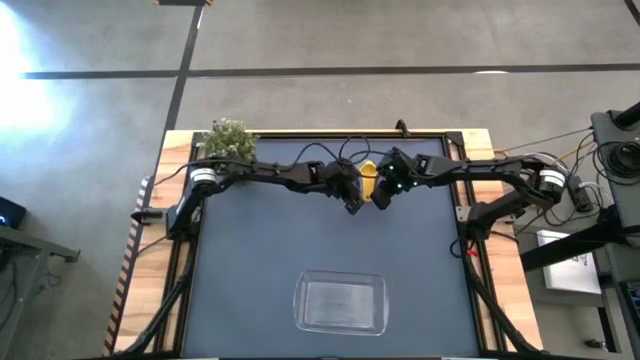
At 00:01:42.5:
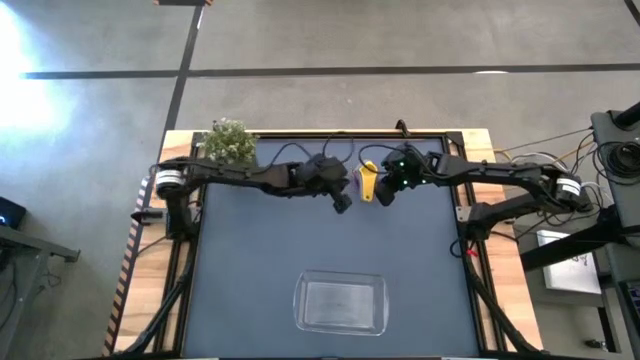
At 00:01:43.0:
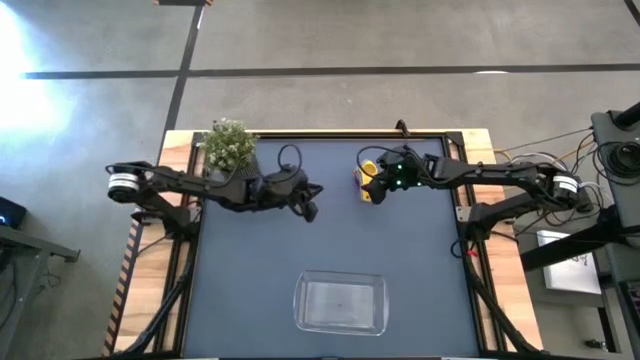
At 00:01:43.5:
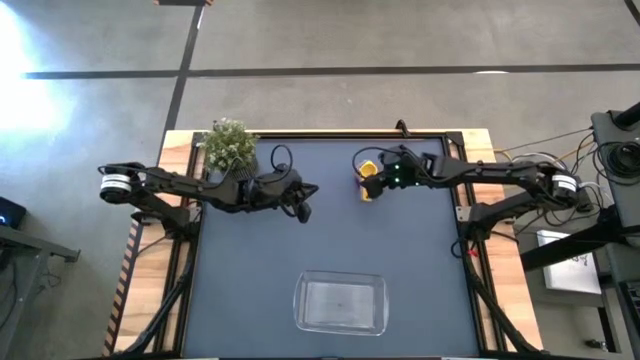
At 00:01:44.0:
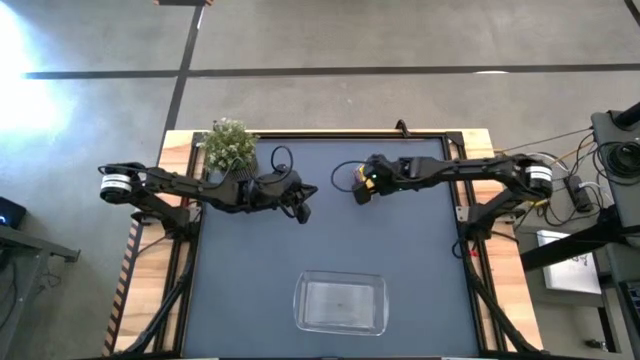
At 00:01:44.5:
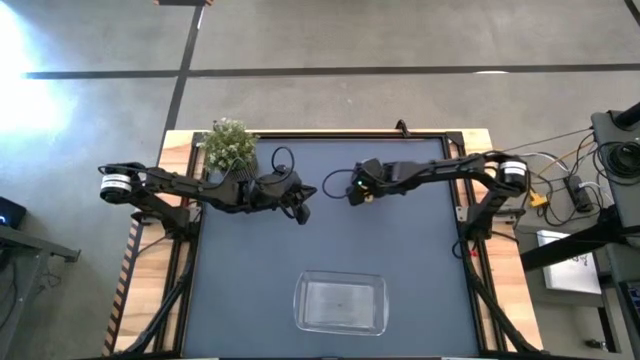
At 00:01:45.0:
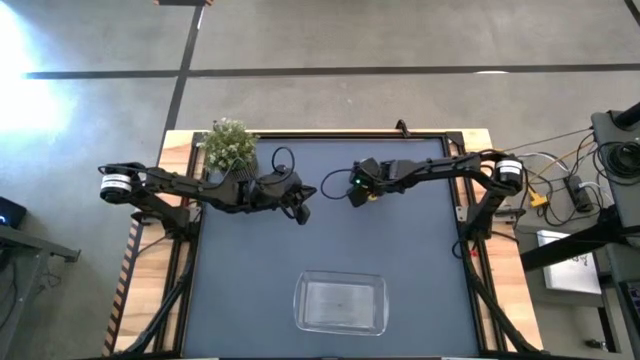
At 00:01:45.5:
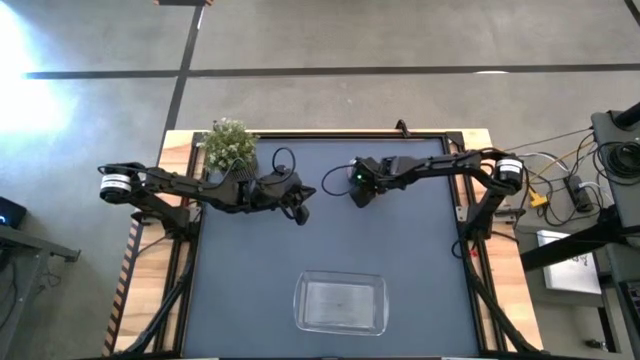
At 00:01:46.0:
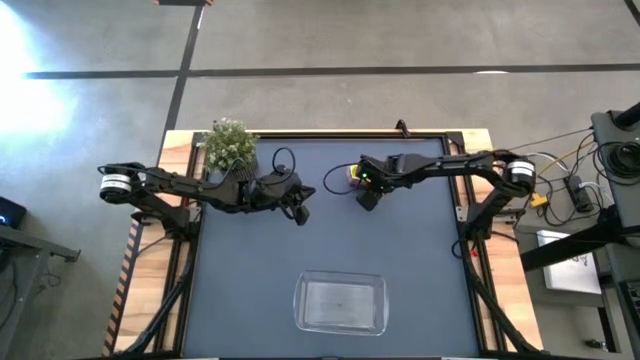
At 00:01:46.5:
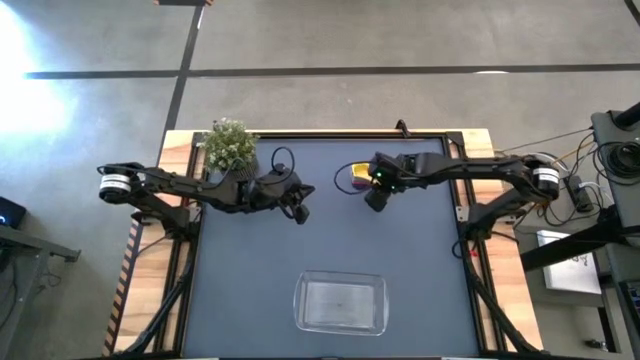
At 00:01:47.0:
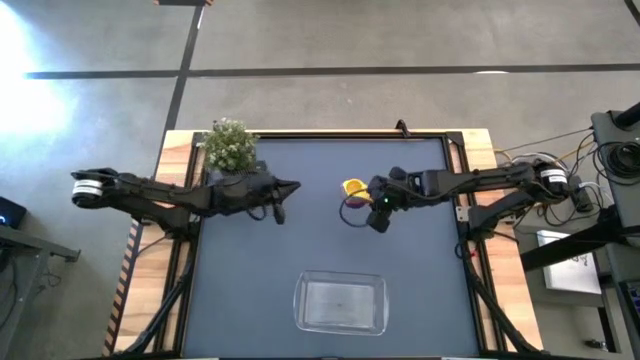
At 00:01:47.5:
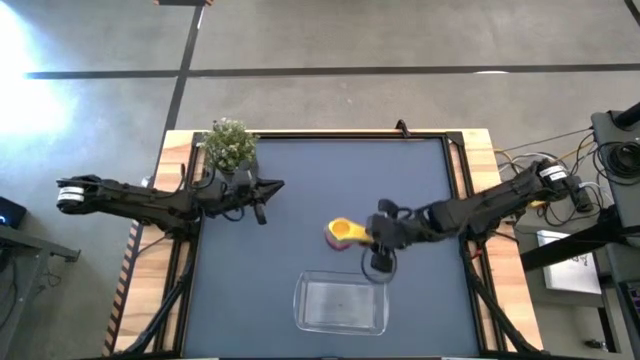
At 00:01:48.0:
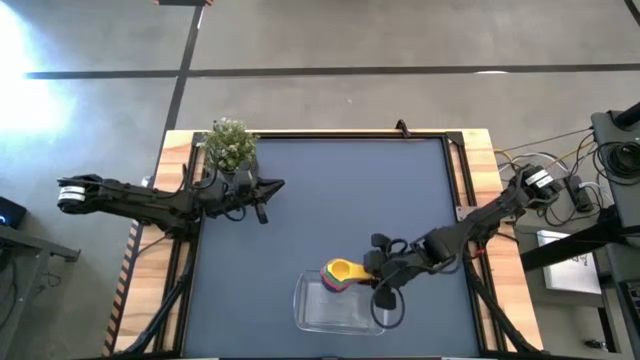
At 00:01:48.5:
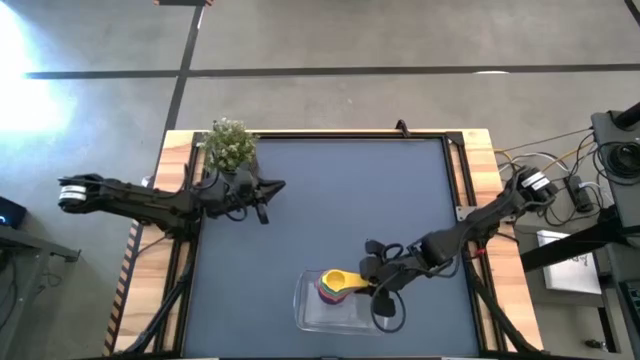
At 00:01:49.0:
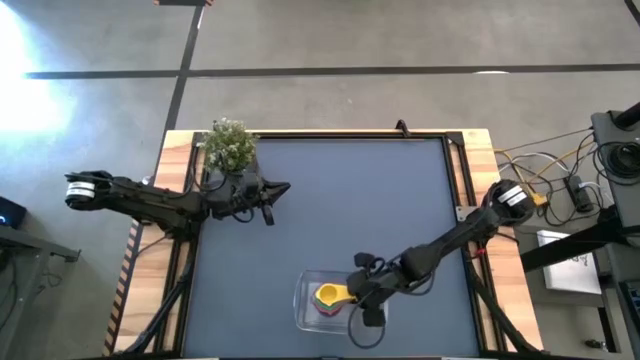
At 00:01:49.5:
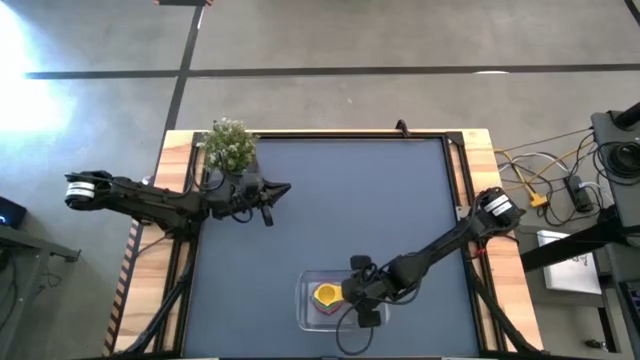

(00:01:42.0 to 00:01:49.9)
Task: Nest measuring cups in basket
Put the stacked measuring cups into the transparent bin

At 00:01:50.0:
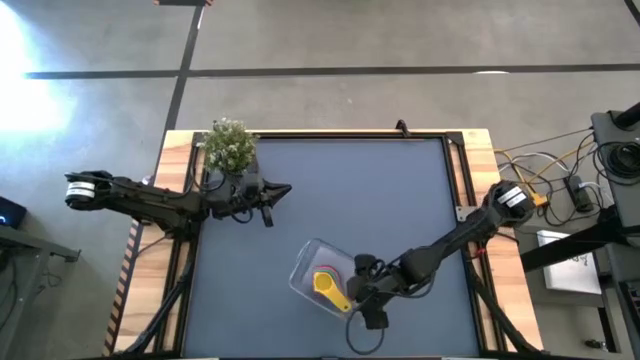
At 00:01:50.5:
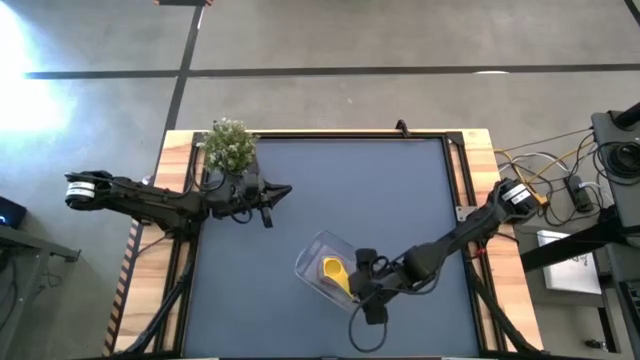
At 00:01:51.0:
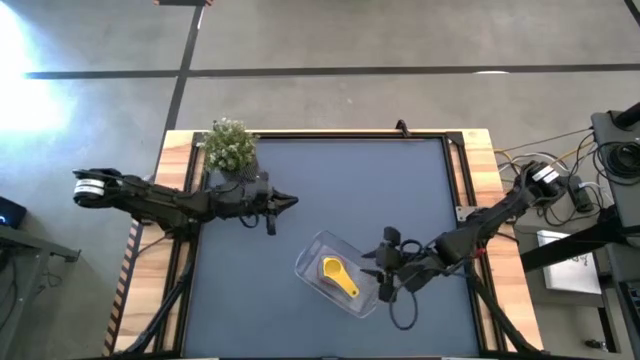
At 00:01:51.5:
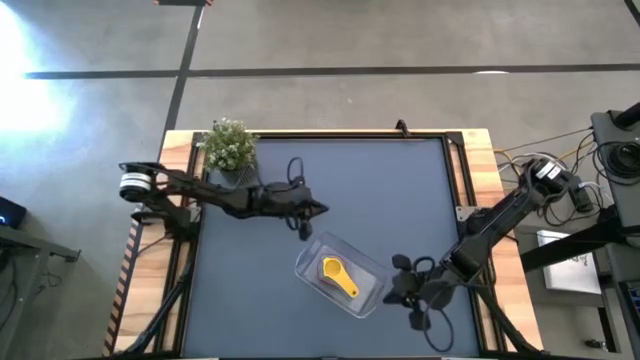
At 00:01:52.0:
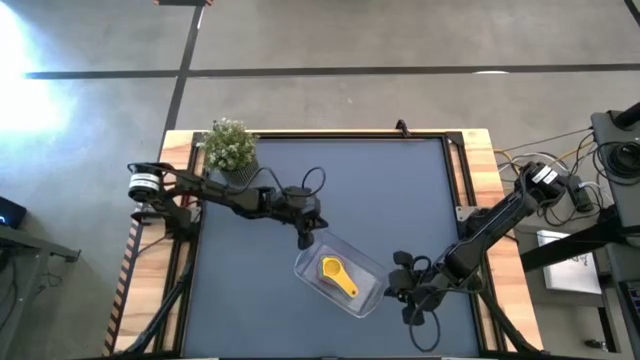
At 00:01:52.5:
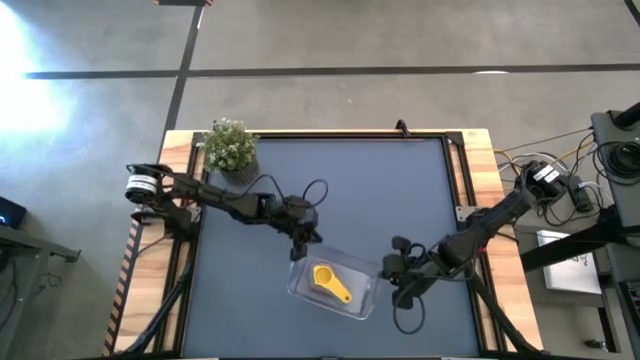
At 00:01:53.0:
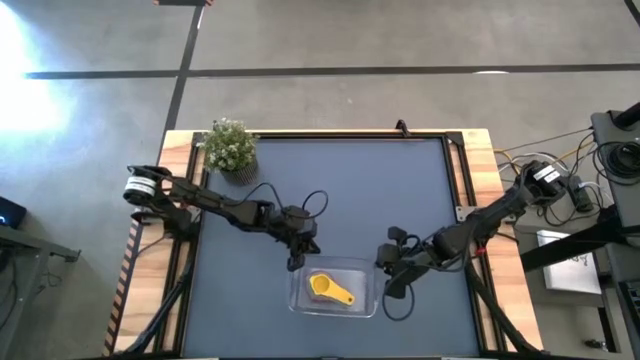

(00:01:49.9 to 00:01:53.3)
Adjust the transparent bin

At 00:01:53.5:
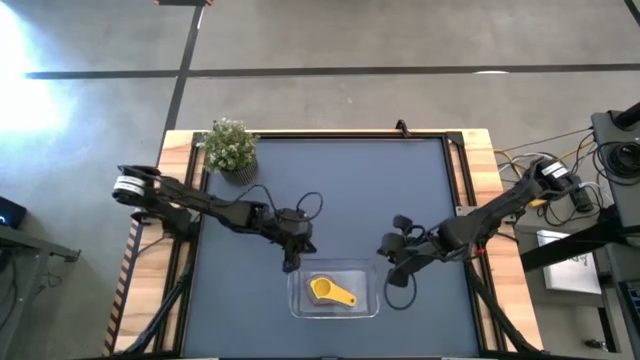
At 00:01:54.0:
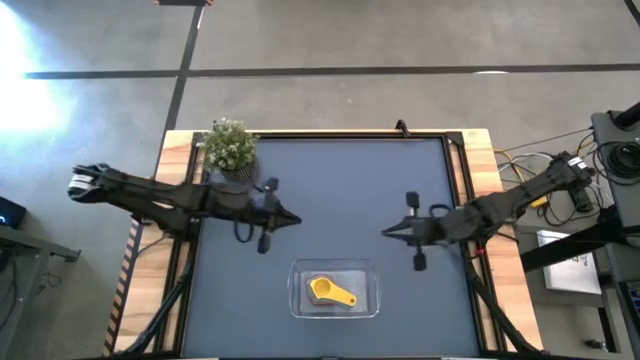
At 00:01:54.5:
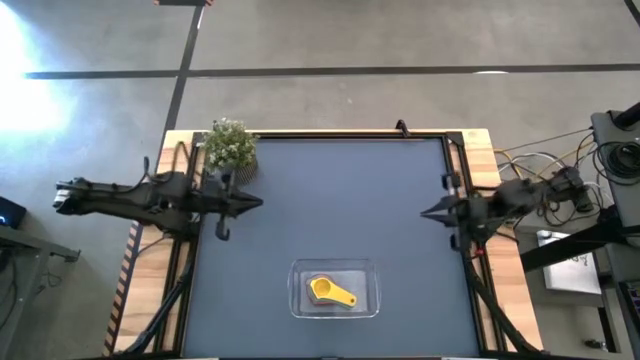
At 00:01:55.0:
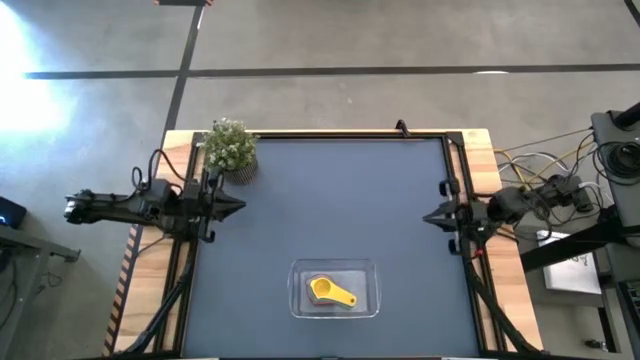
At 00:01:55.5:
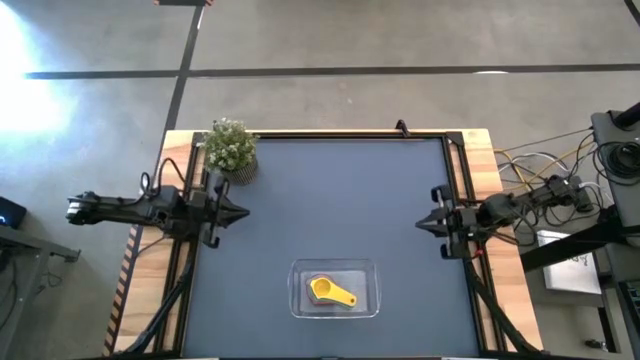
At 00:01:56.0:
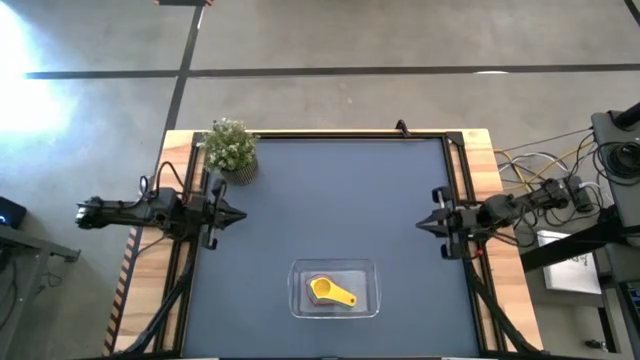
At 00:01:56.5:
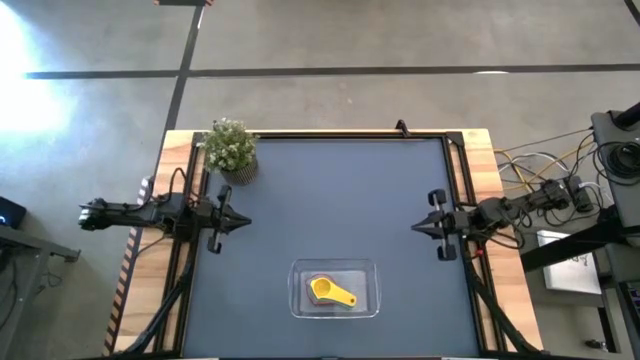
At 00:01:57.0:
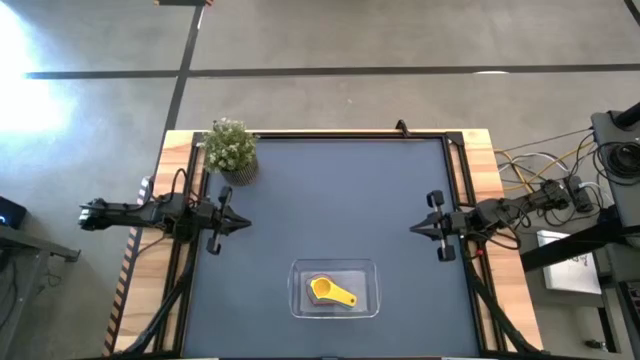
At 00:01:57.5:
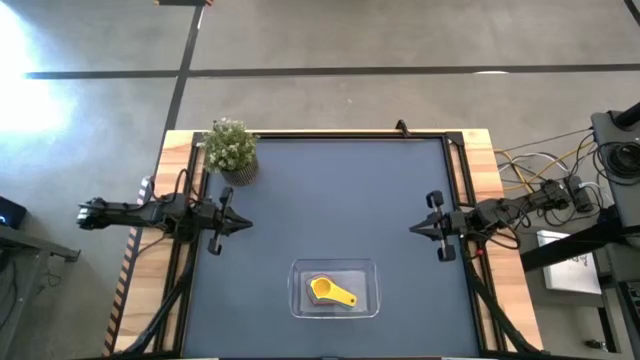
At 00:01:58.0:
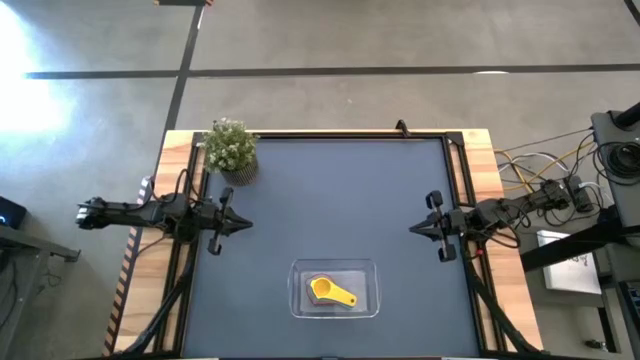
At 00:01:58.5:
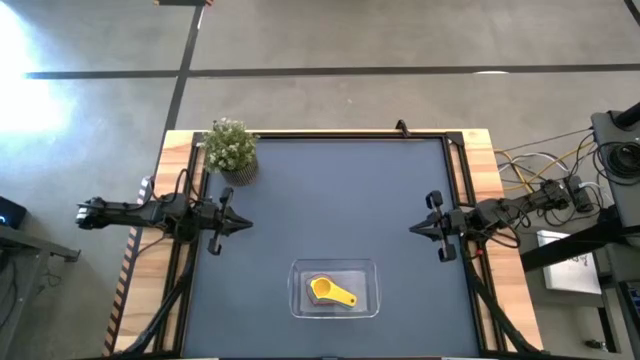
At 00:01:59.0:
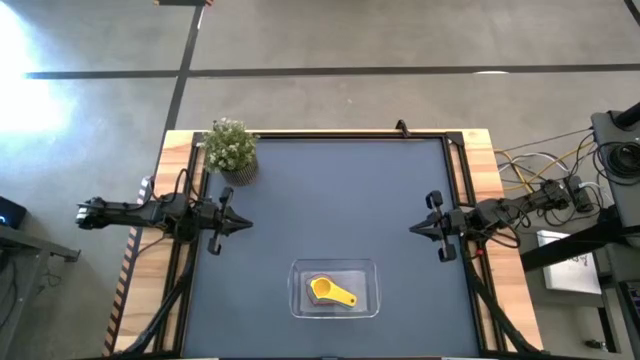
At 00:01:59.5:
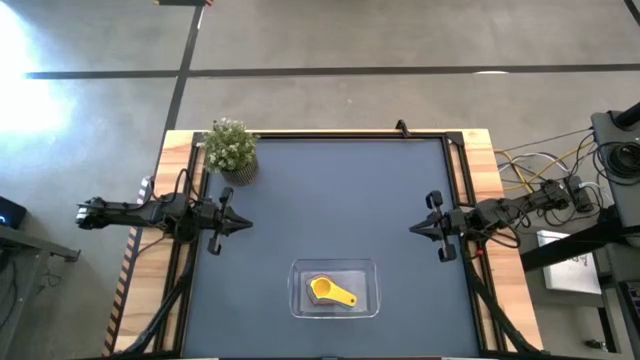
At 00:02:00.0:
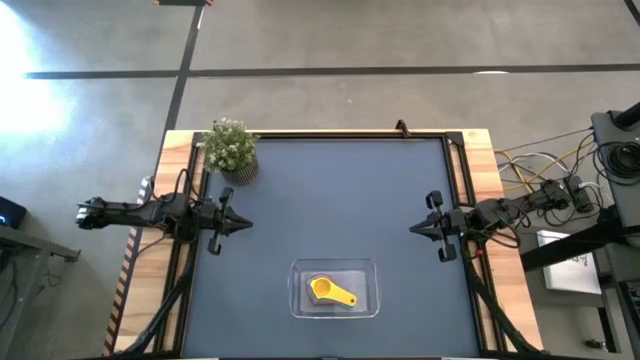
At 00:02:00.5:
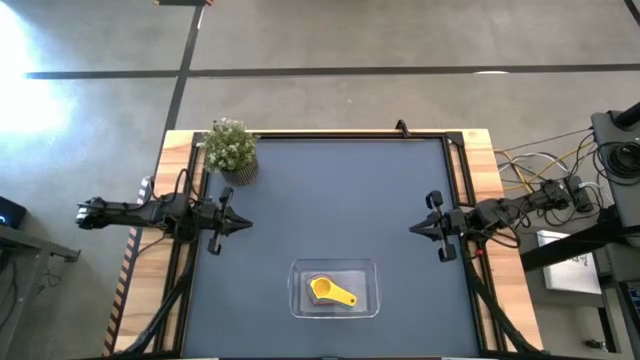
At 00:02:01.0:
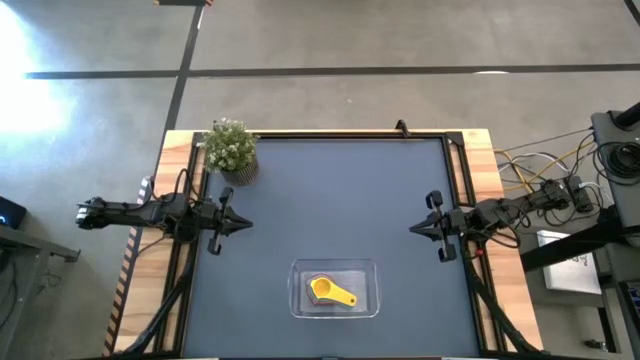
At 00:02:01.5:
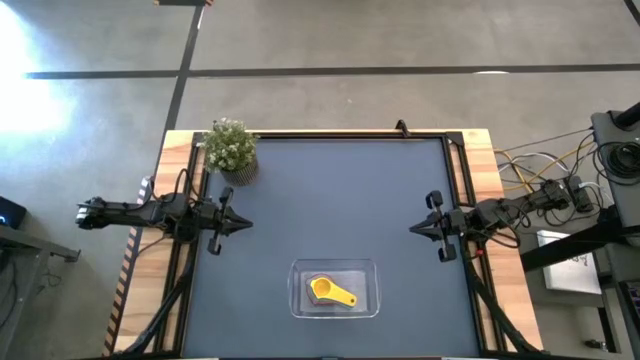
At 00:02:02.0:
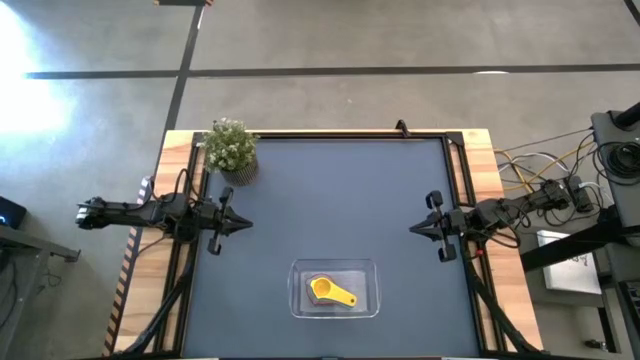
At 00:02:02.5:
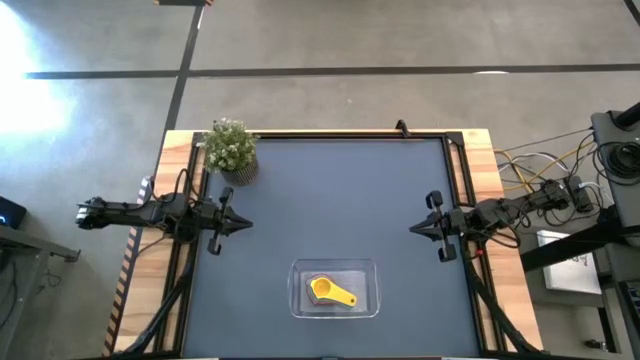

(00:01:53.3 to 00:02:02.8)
Return to Home Position
